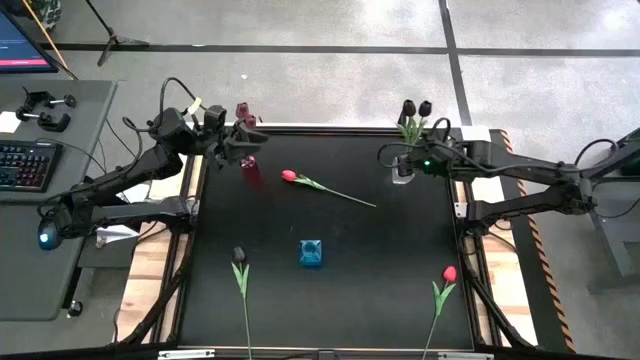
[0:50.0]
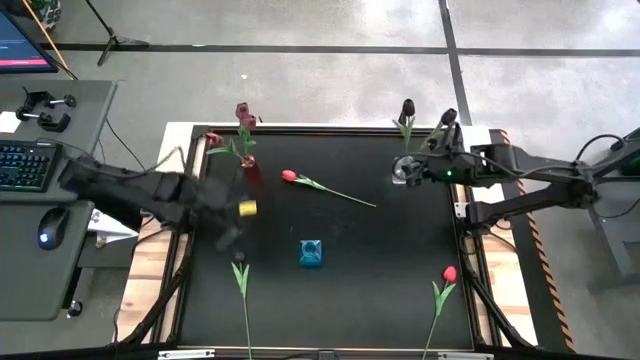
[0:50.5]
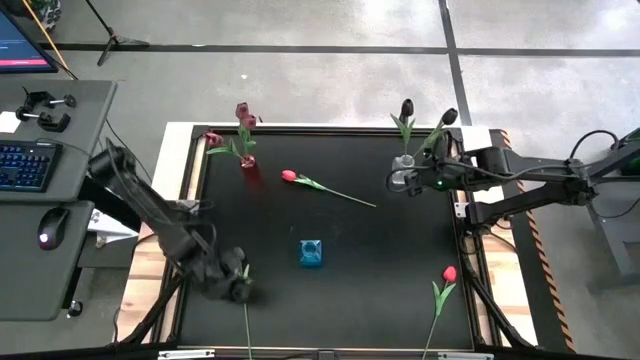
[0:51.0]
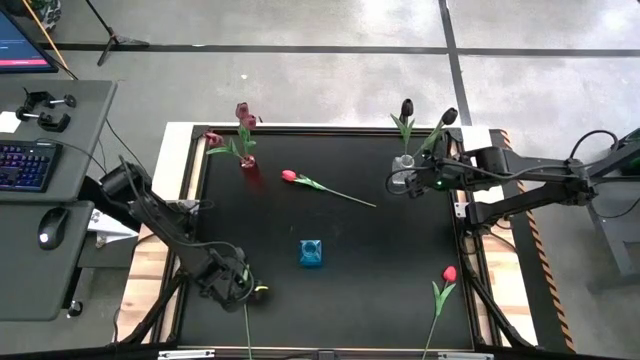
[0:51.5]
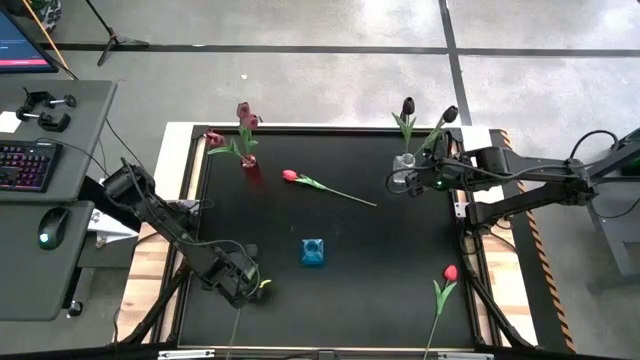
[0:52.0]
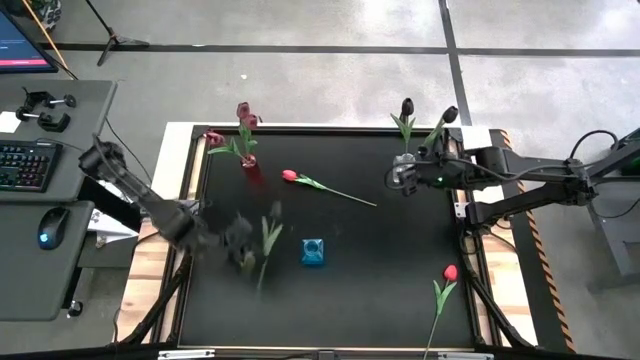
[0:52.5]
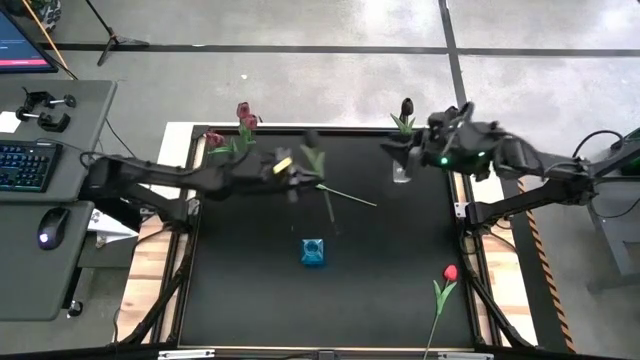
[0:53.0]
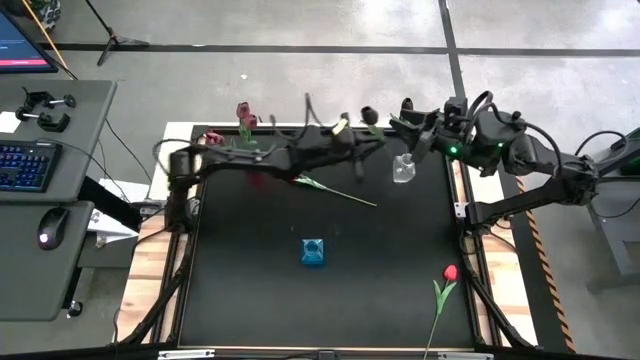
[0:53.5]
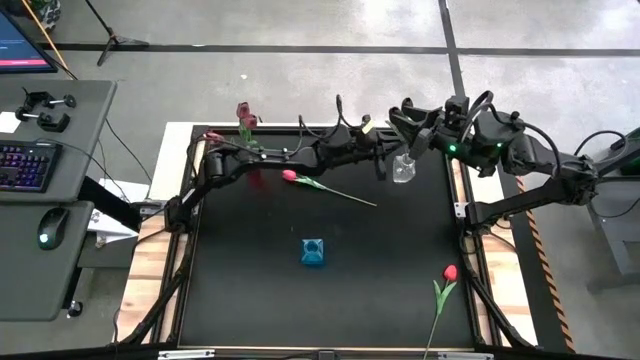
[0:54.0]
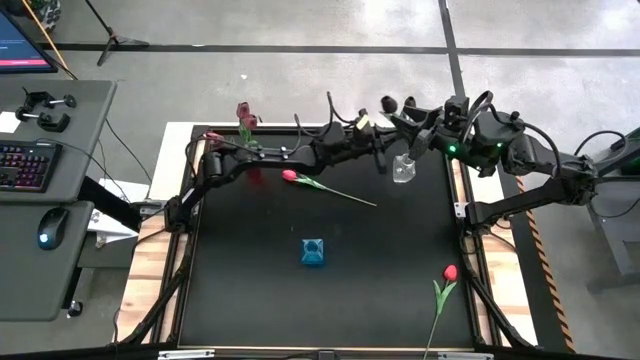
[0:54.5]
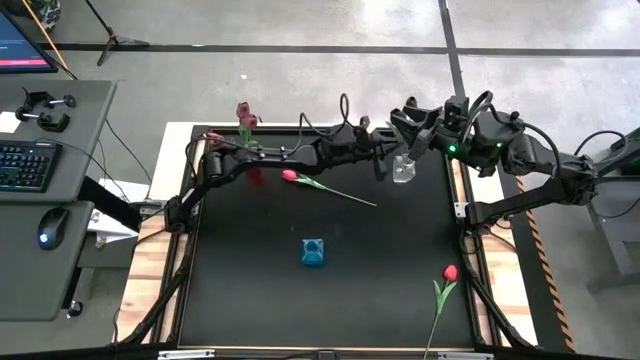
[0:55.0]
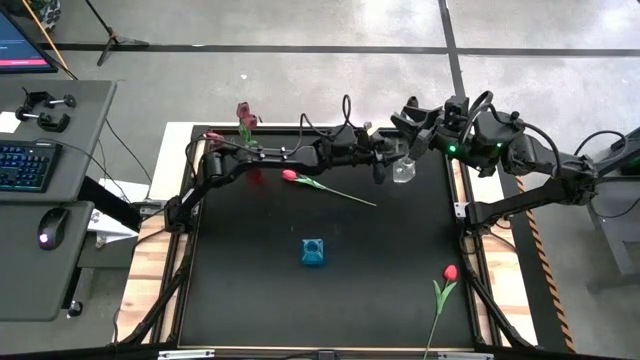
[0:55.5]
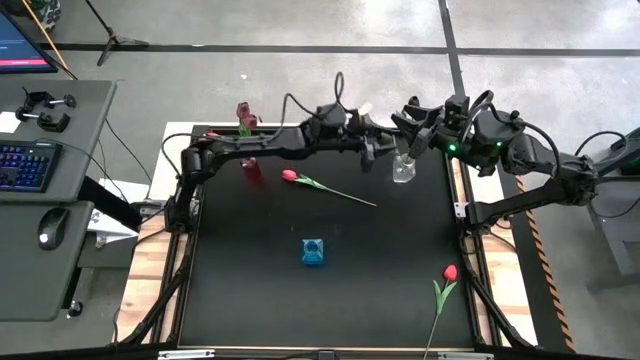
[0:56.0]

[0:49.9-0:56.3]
Task: Sort flowers into vase by color
Put the black flower into the transparent vase

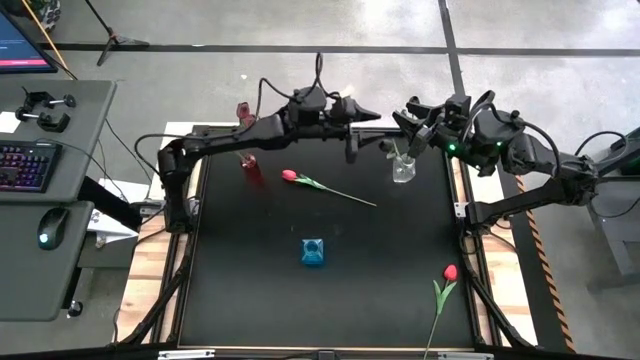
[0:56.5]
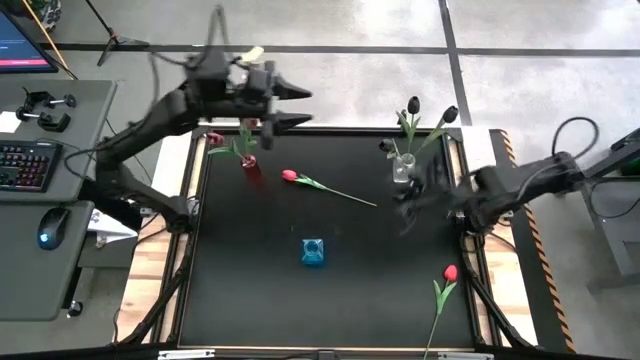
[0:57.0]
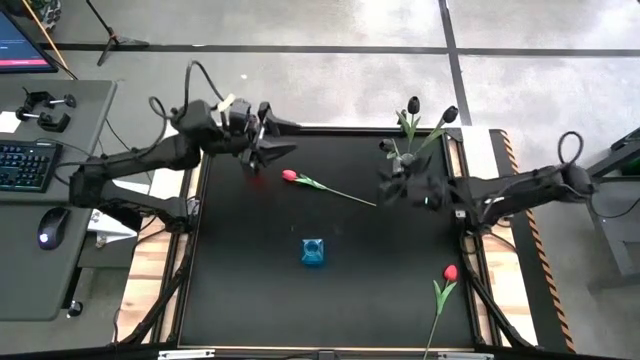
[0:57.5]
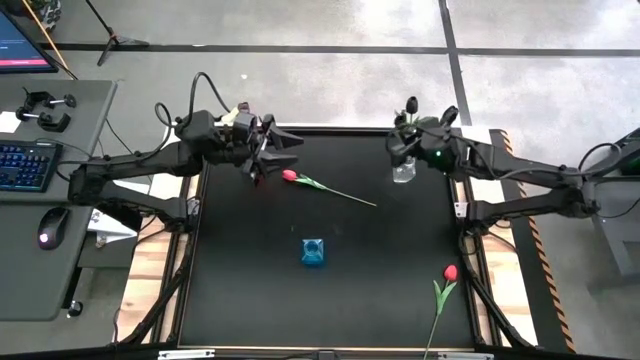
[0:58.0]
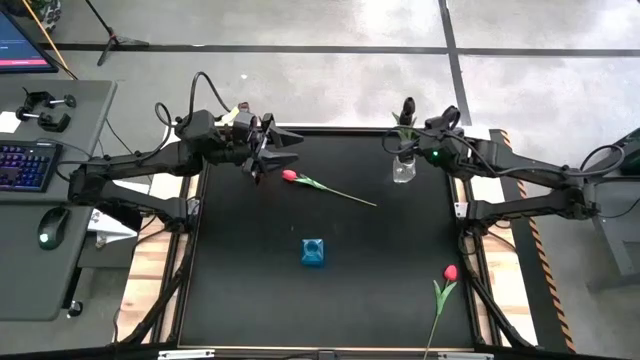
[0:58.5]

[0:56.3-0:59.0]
Adjust the black flower

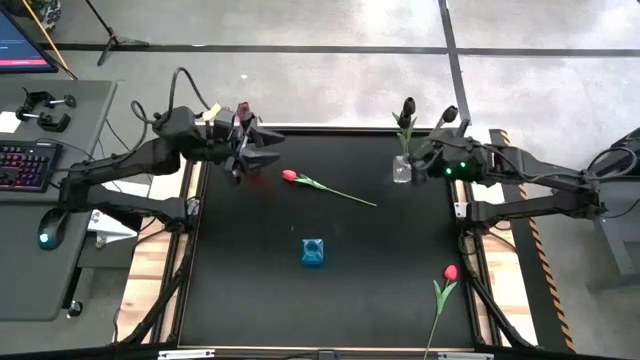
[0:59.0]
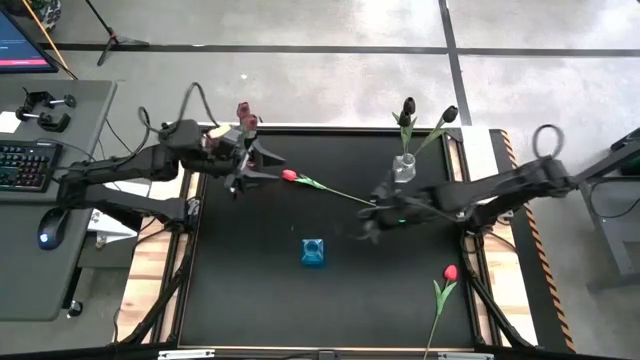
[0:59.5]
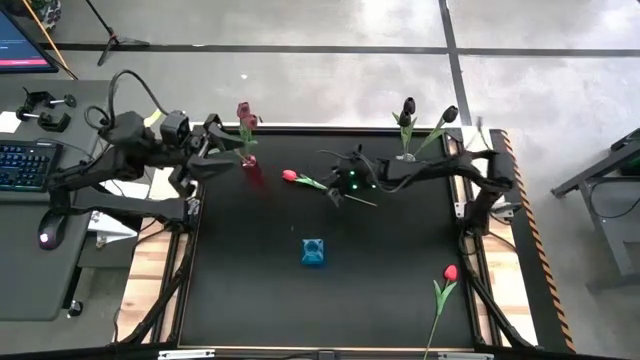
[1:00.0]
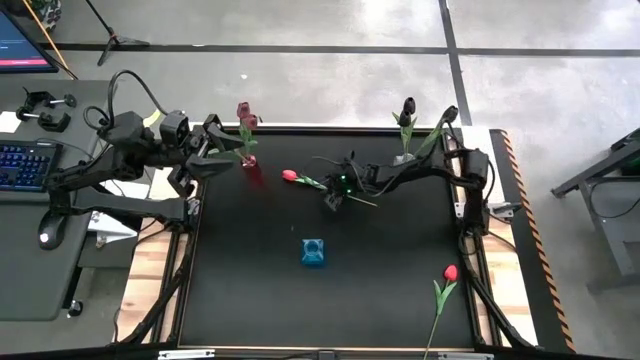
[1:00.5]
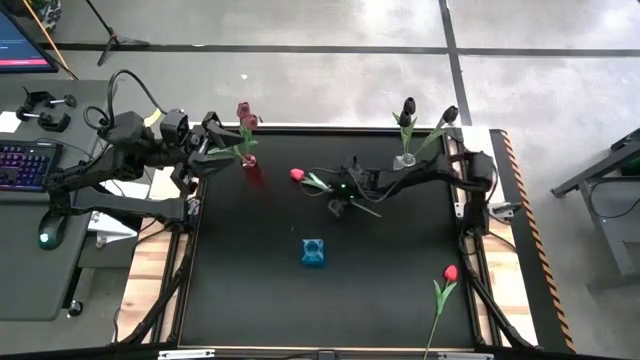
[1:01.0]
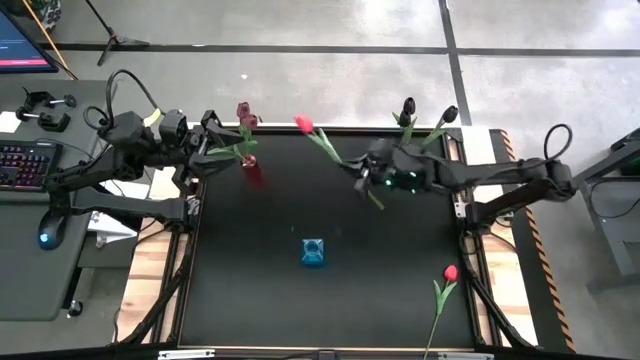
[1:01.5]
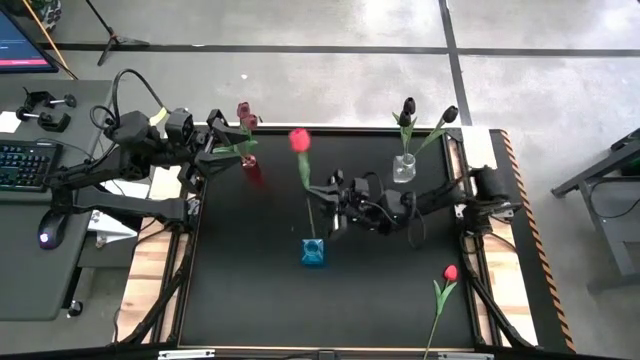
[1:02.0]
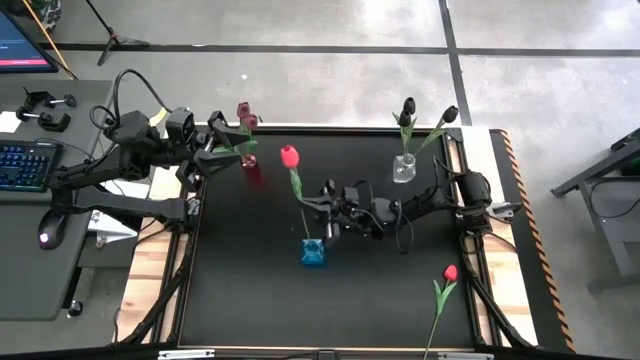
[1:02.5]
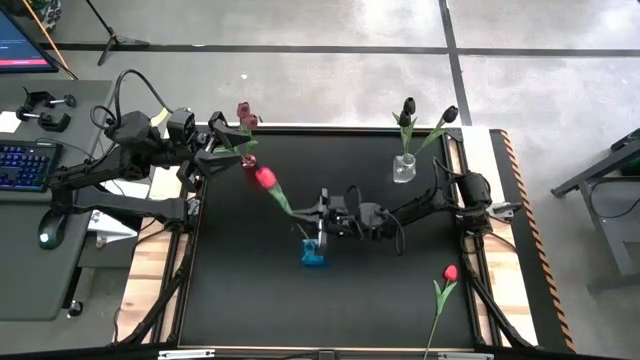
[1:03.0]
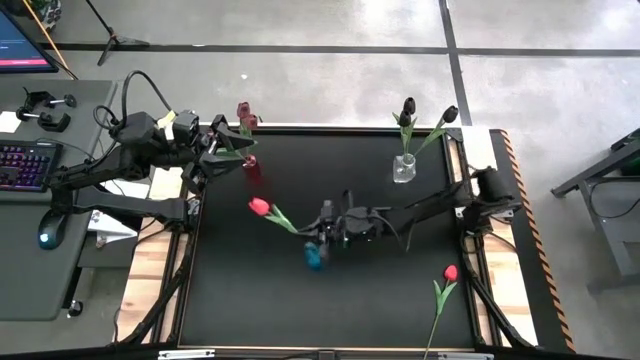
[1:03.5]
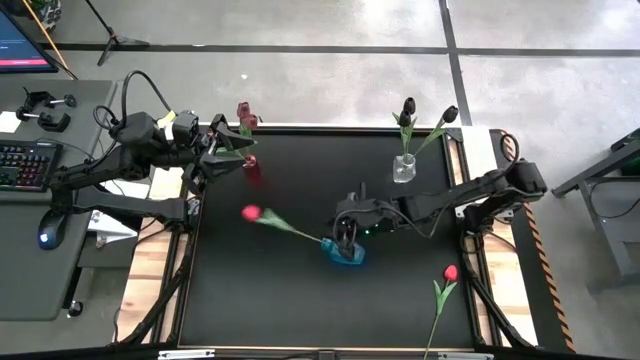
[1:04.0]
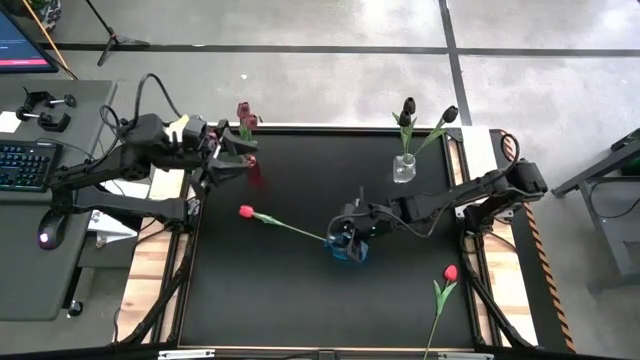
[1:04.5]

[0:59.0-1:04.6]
Put the top red flower into the blue vase

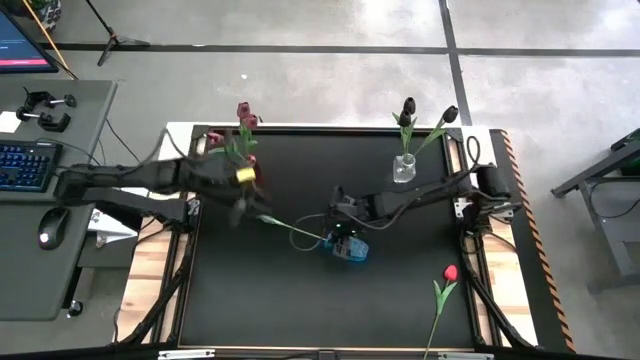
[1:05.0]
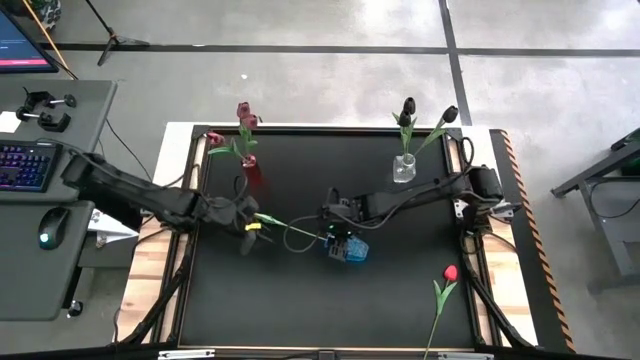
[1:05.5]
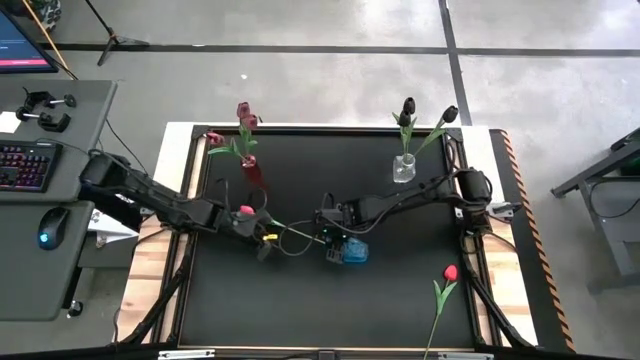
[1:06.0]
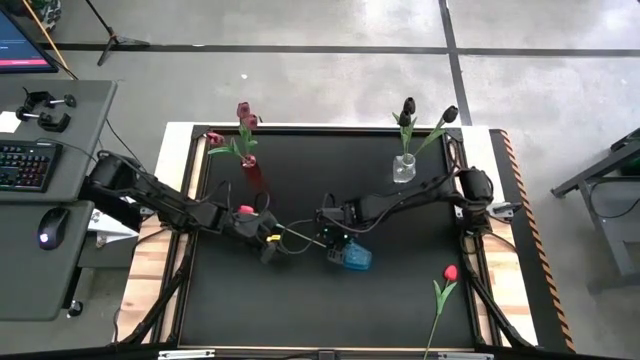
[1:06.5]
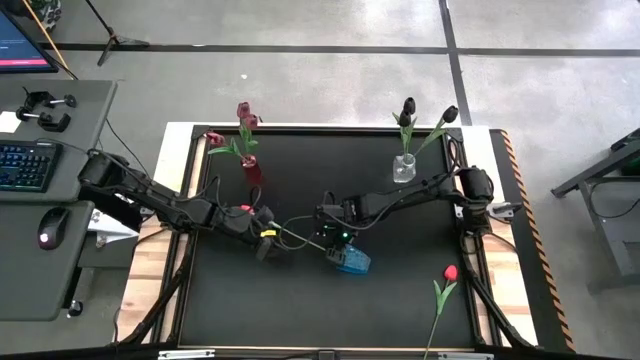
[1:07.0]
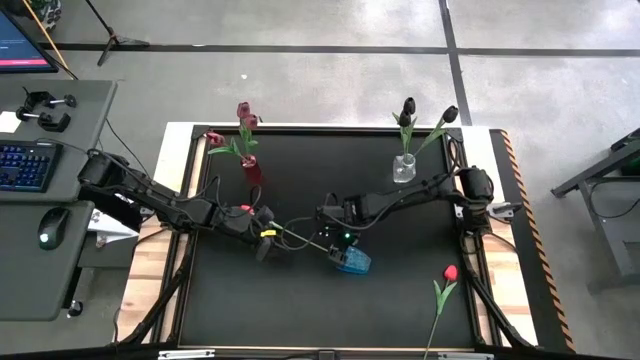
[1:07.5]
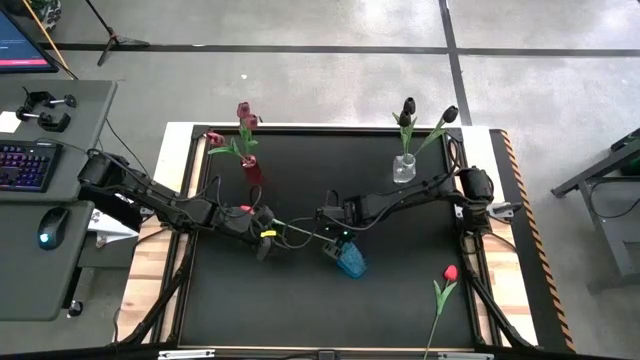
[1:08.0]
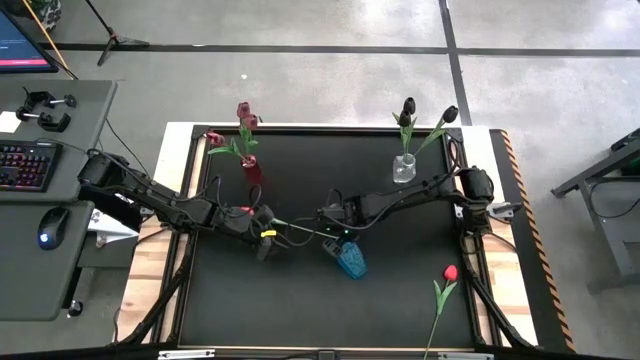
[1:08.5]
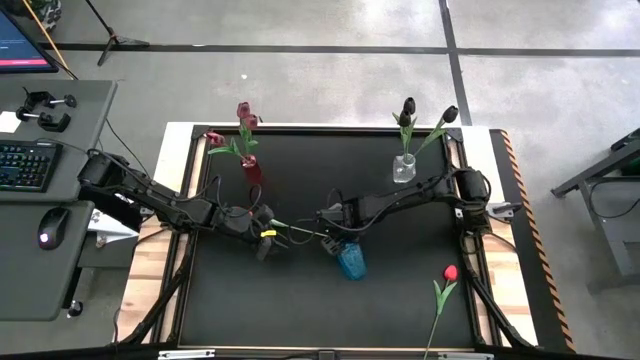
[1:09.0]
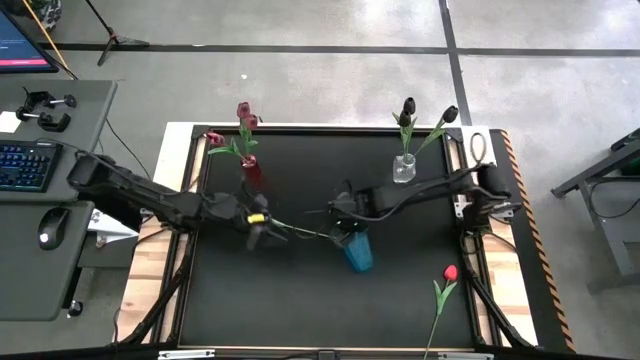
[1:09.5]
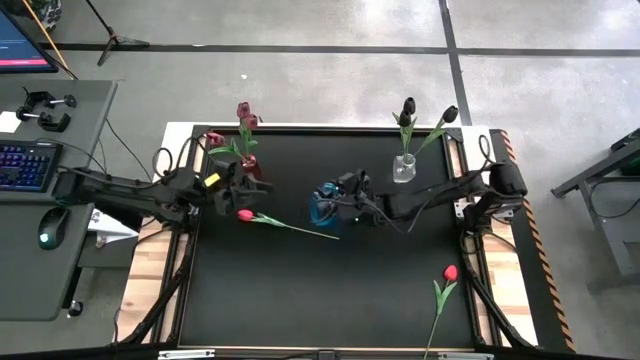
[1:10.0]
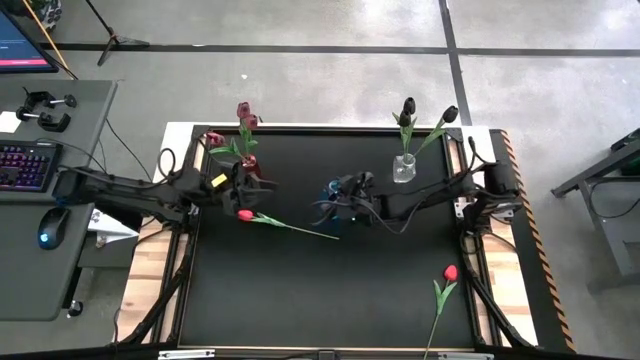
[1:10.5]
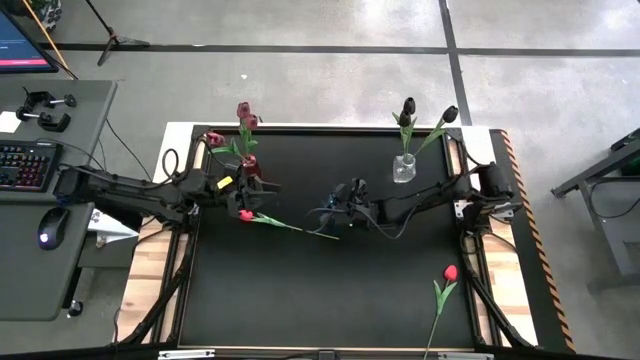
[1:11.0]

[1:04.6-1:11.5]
Put the blue vase on the table
